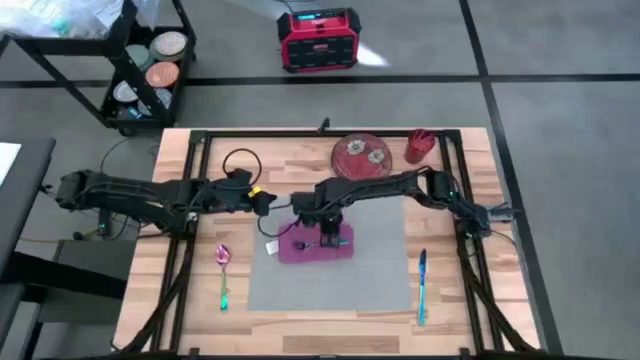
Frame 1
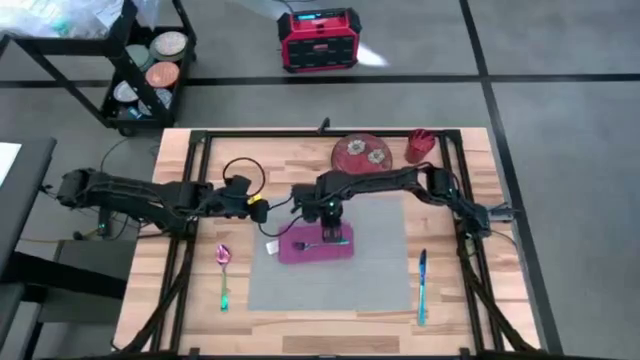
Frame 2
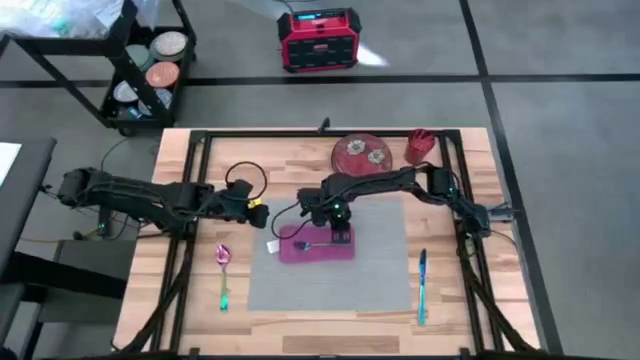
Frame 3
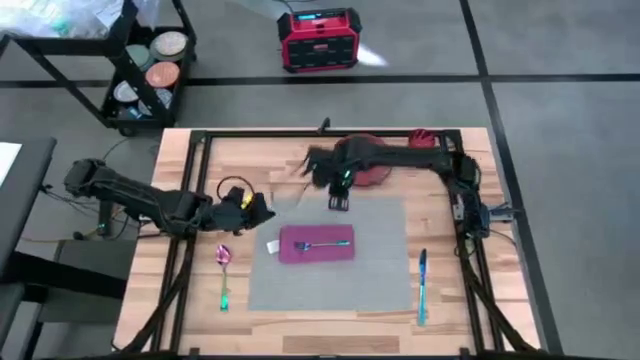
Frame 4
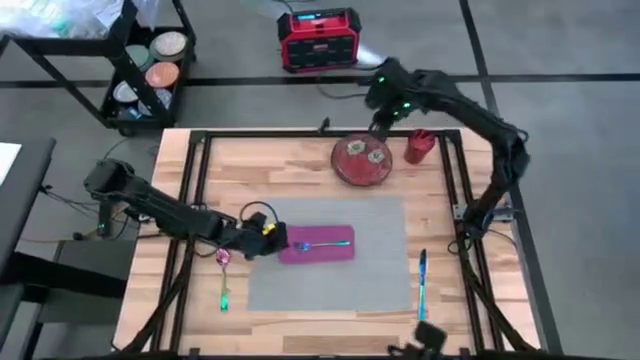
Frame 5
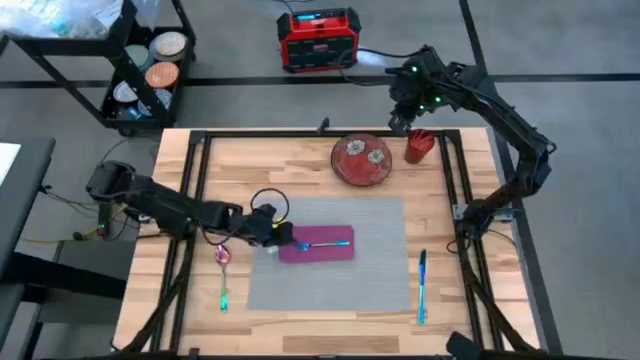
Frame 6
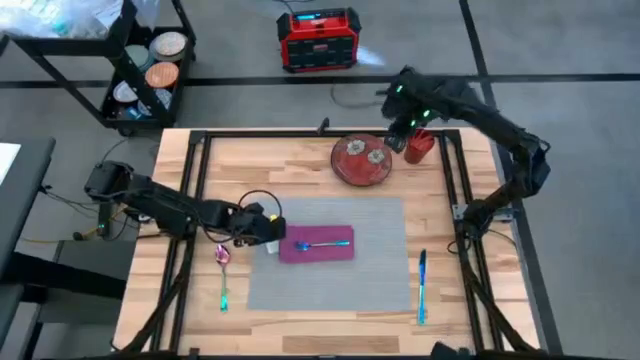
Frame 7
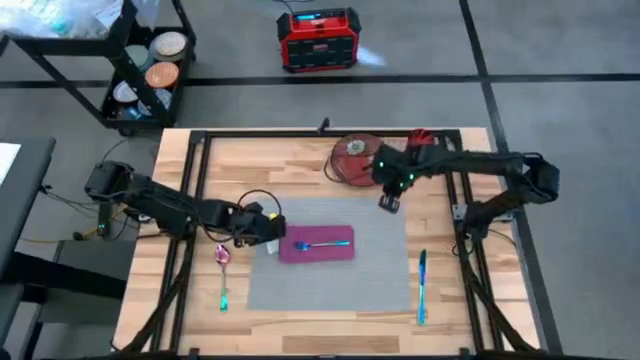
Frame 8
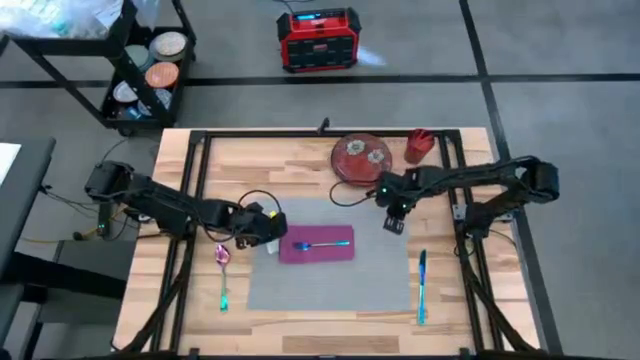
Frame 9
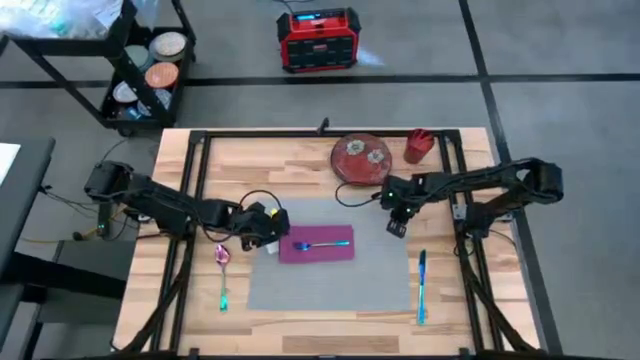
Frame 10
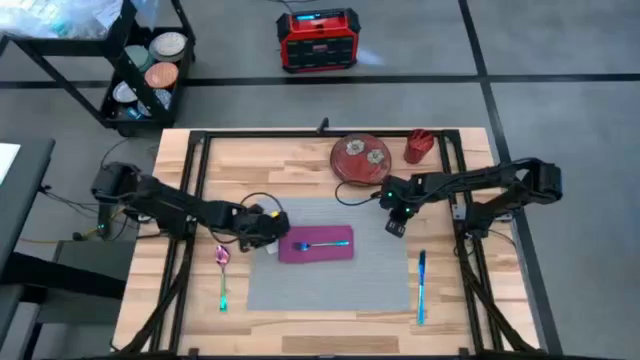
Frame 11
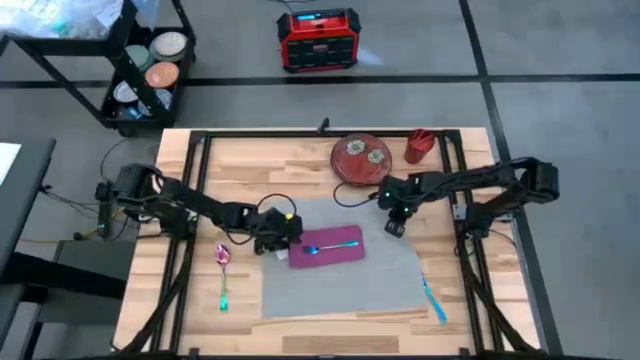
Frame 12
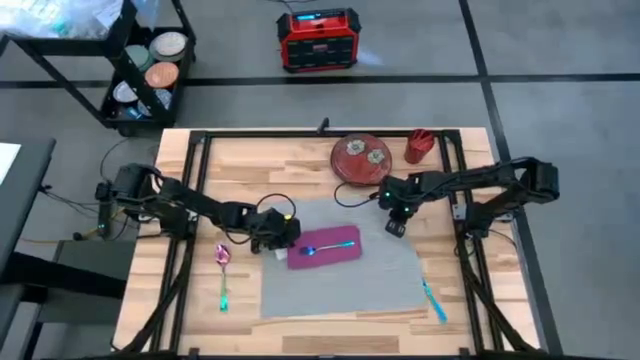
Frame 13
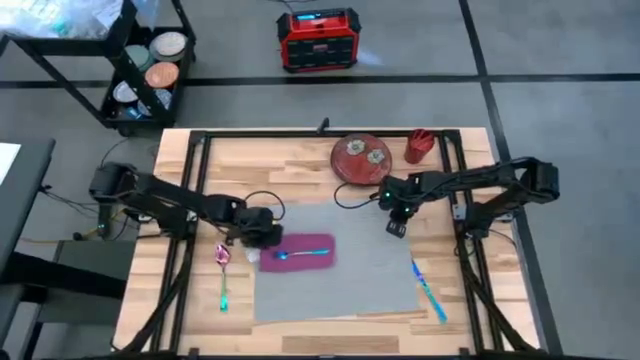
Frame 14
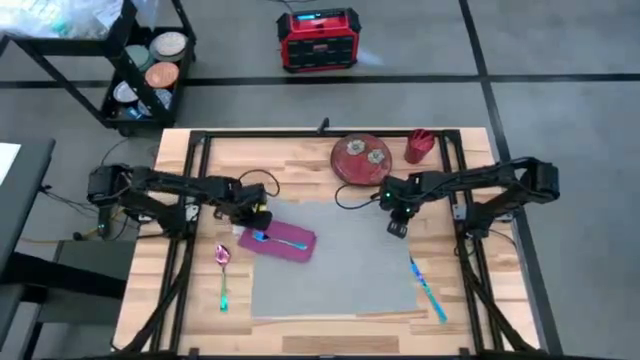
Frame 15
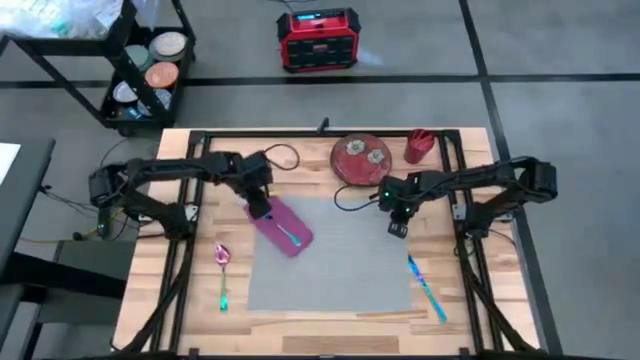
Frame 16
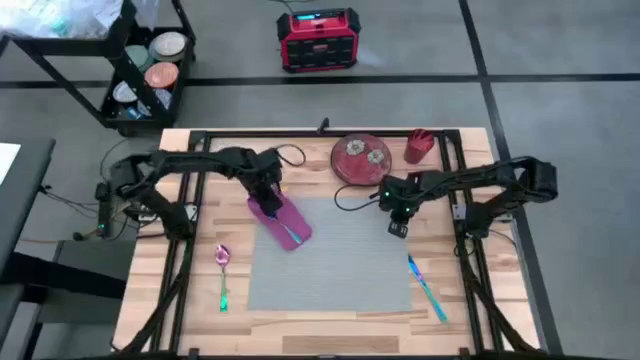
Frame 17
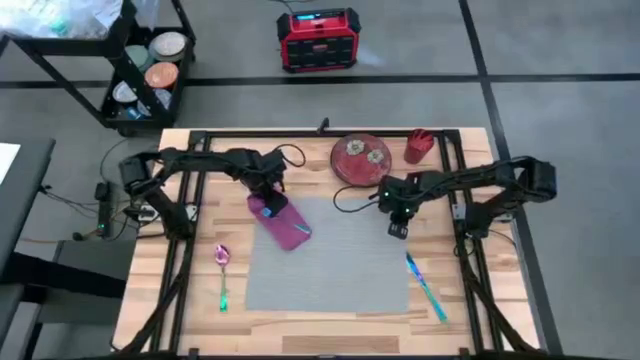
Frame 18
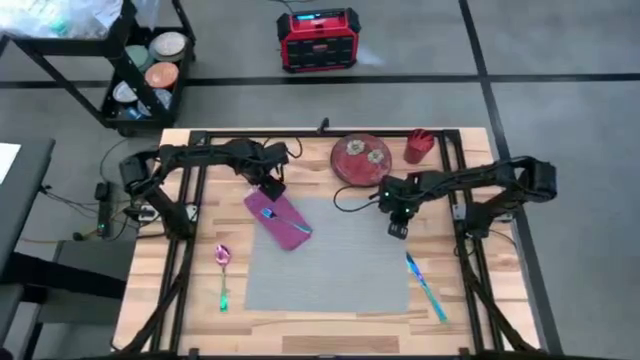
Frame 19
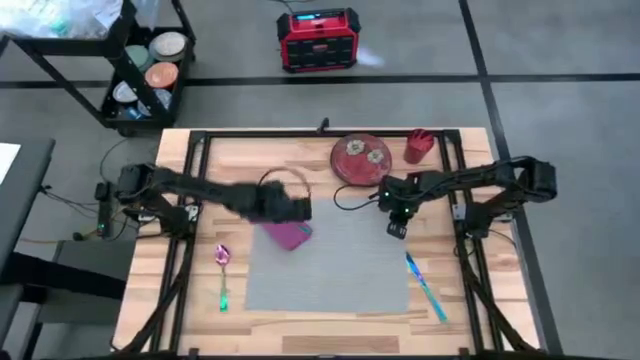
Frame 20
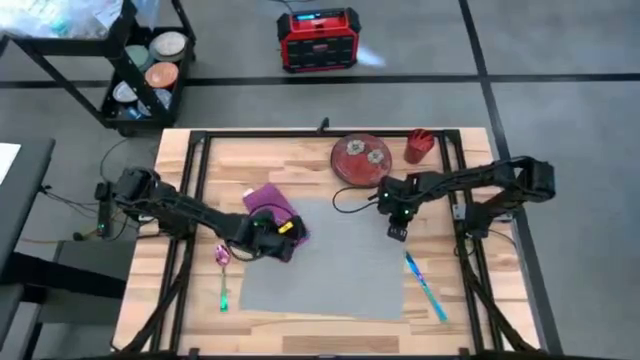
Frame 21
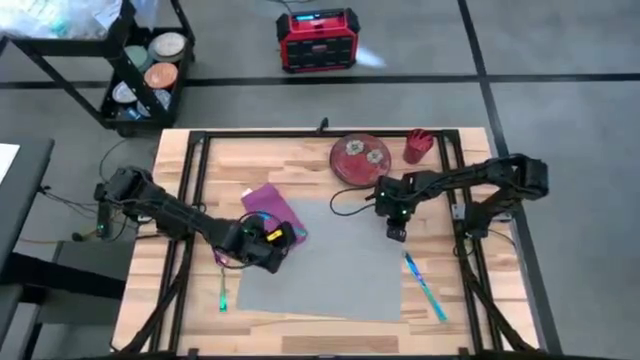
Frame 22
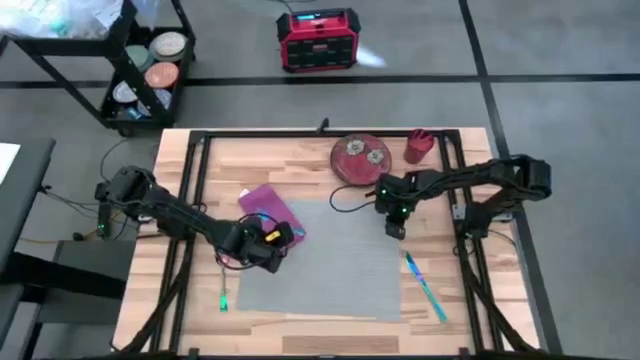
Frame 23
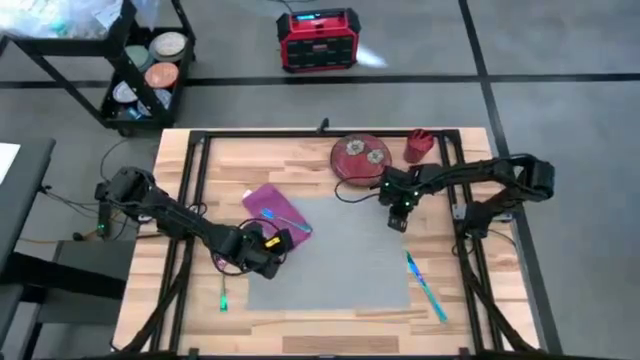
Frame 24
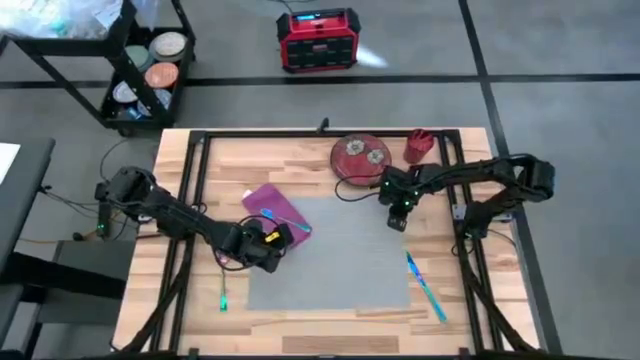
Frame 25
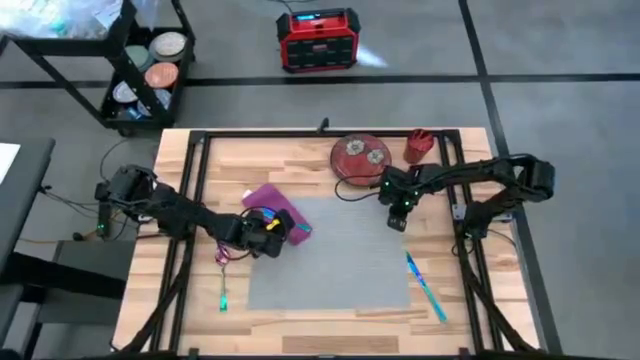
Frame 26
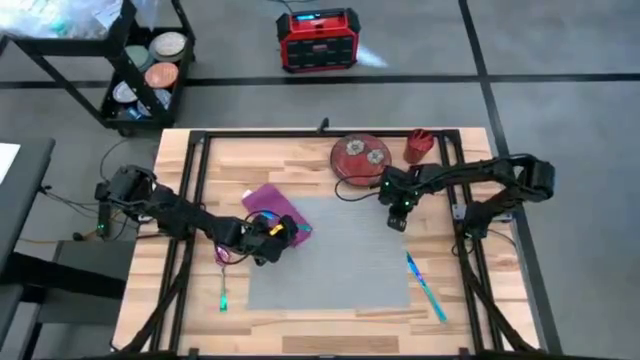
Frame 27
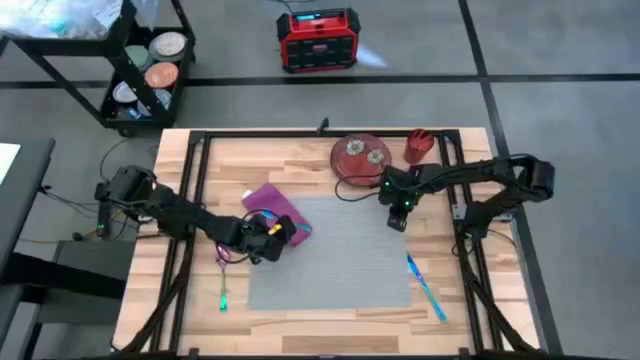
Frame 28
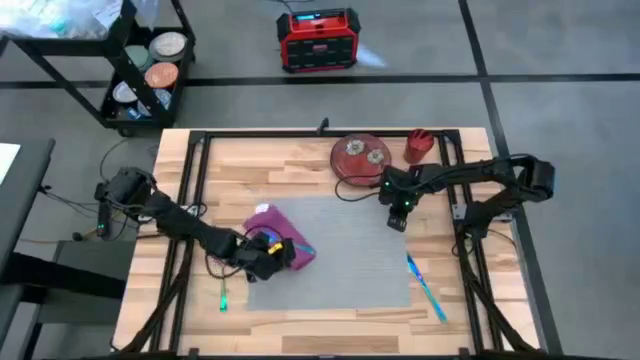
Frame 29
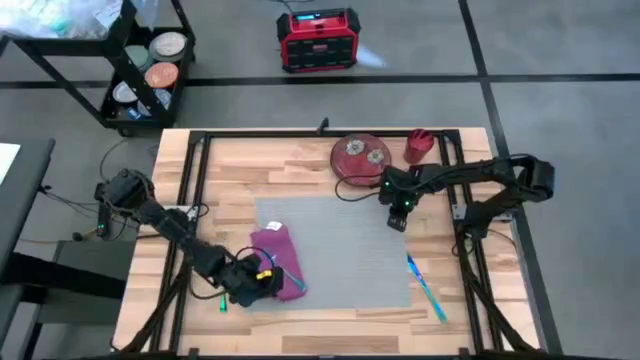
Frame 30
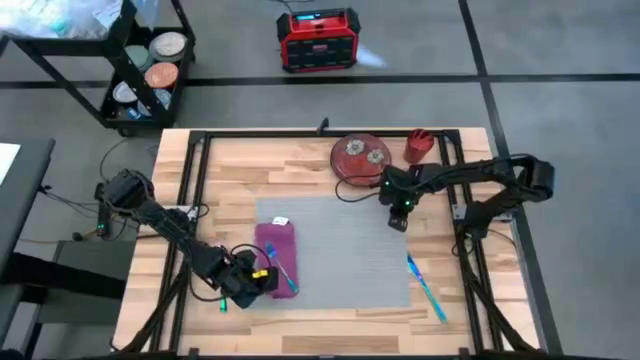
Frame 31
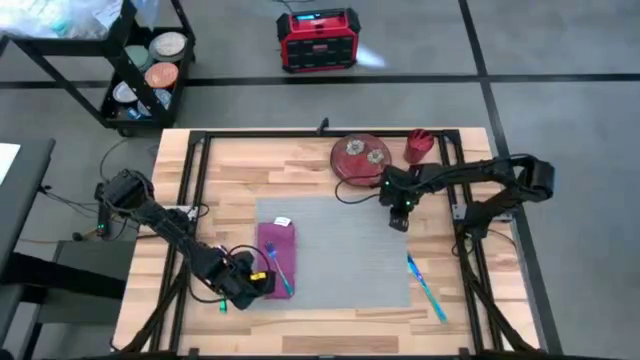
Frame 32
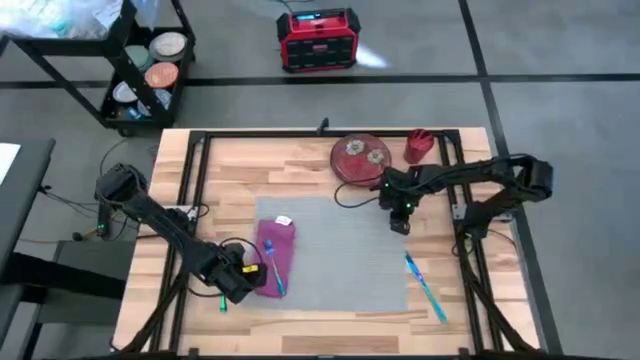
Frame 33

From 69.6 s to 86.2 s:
Task: Set table place
Adjust the violet table napkin on the gray table mat

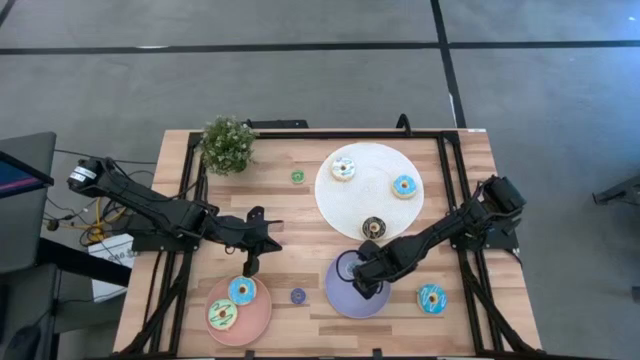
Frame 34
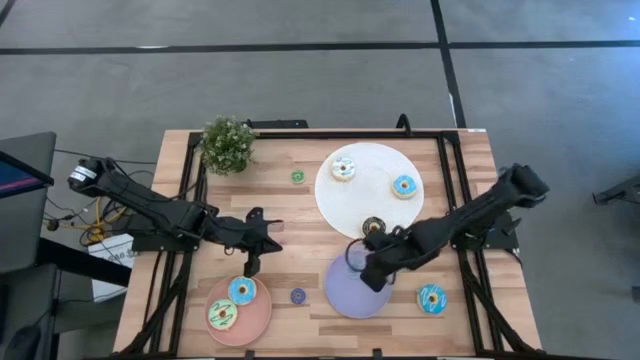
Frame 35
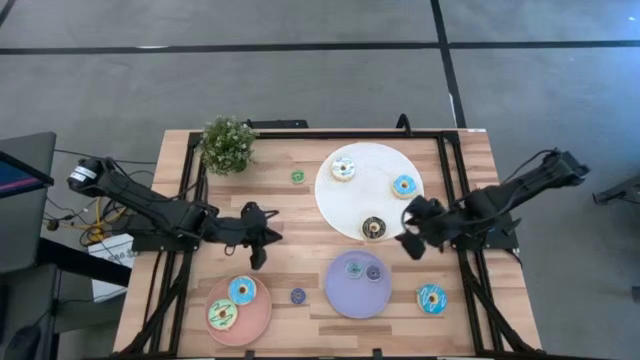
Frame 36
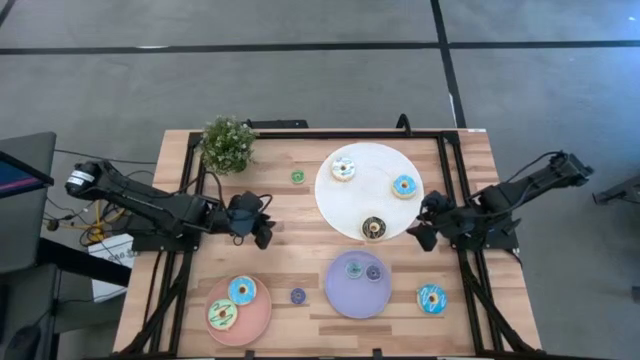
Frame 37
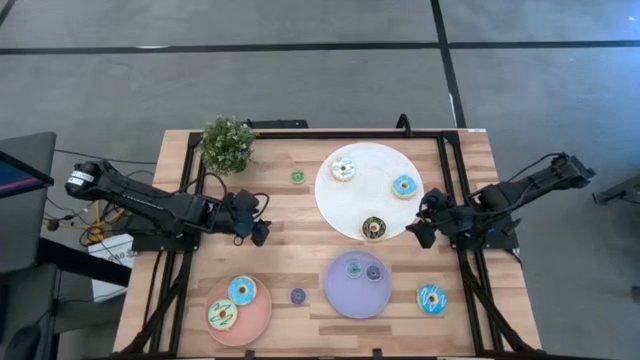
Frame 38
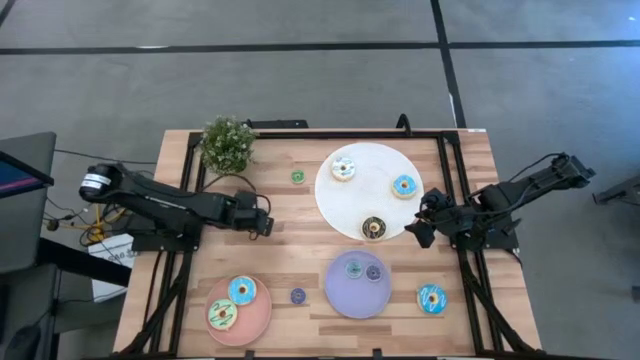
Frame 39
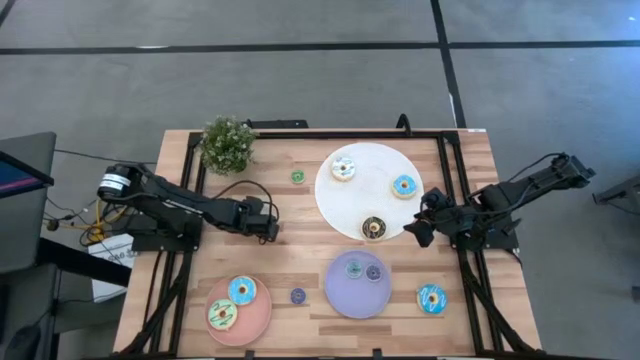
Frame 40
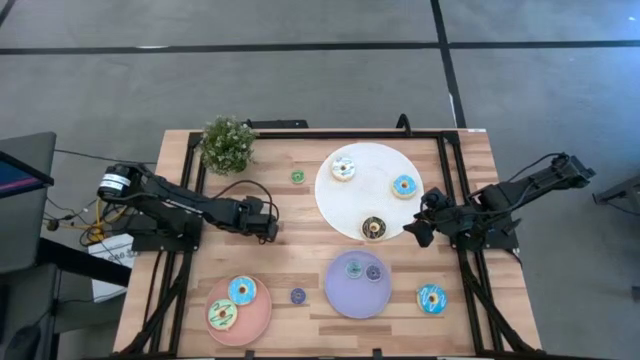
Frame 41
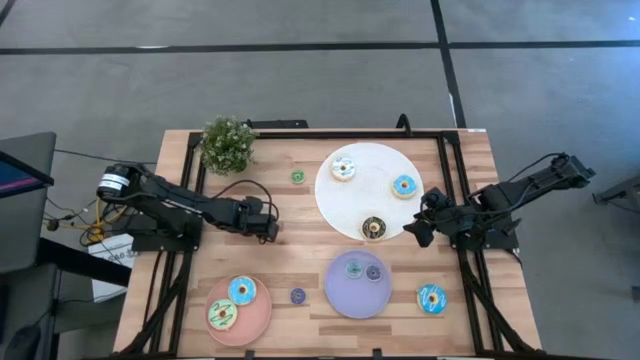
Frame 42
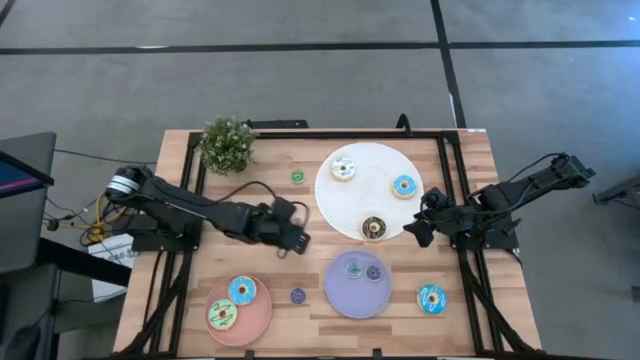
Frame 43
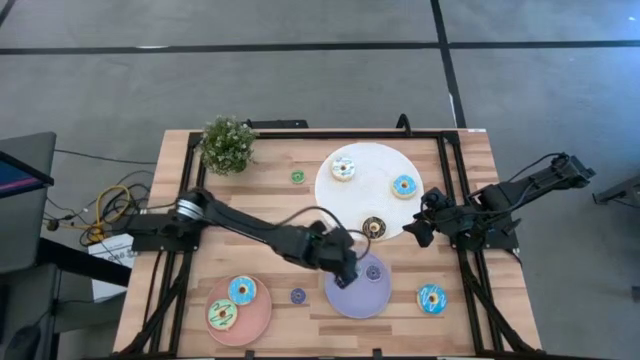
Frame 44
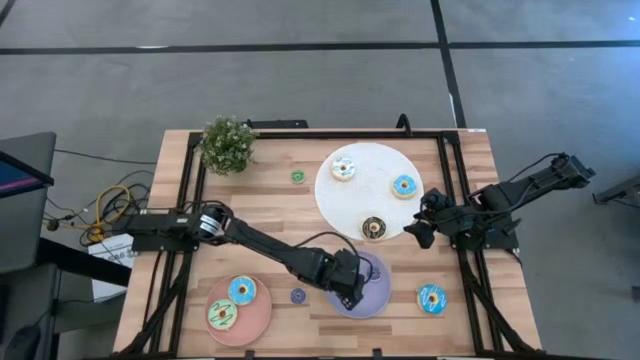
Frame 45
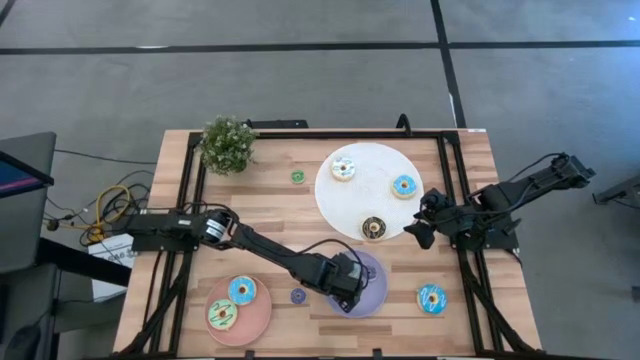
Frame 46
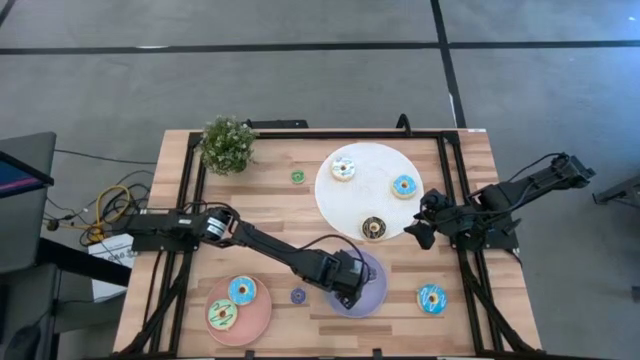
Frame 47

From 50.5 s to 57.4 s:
Task: Pick & Place donuts
Put the small white donut on the purple plate
